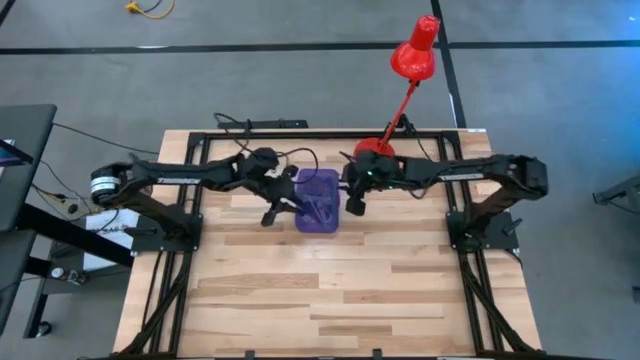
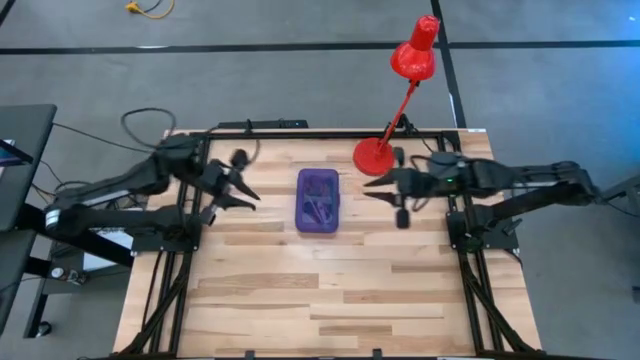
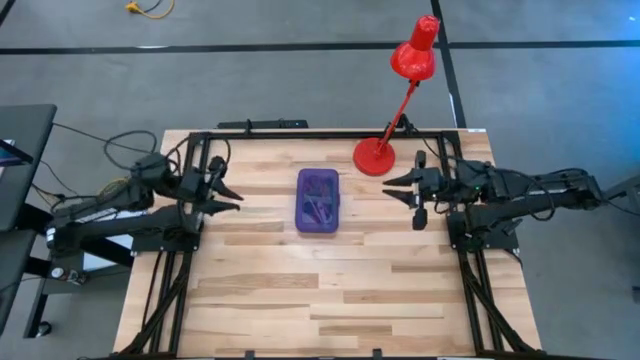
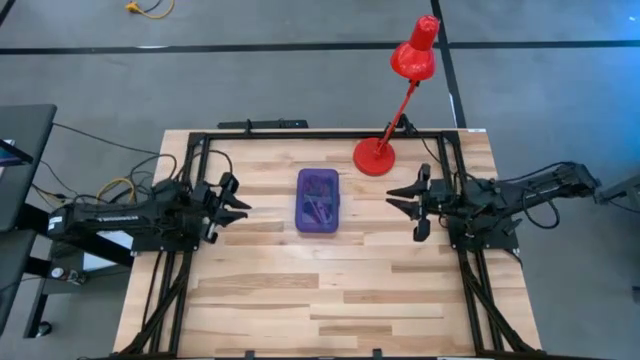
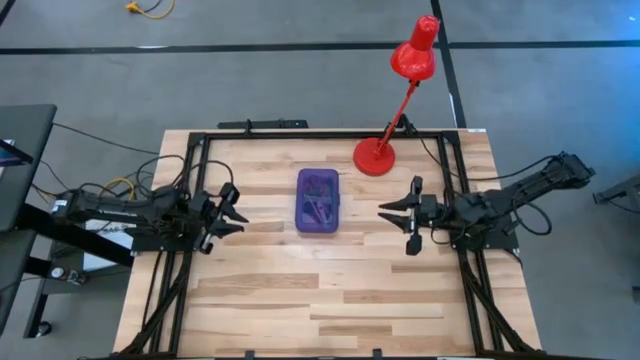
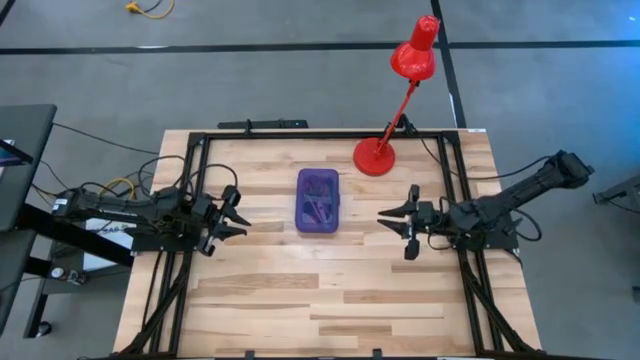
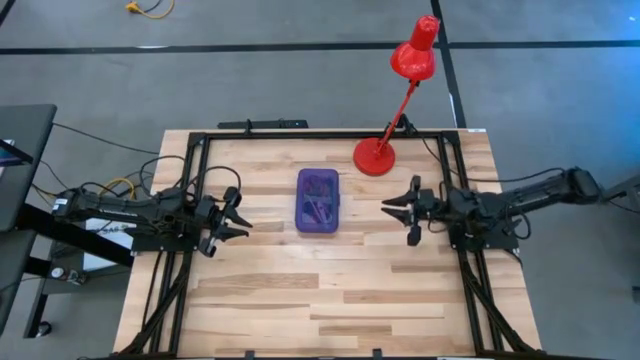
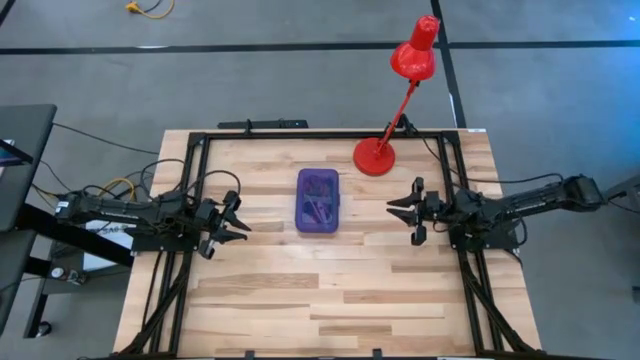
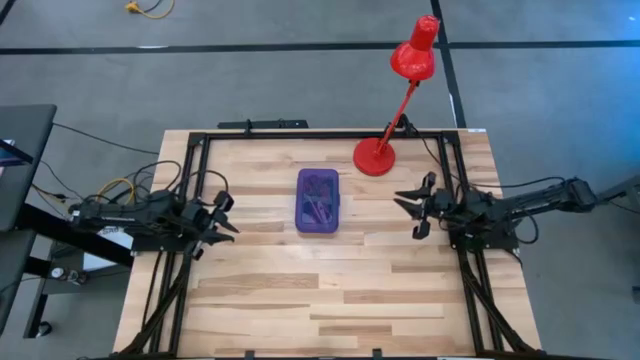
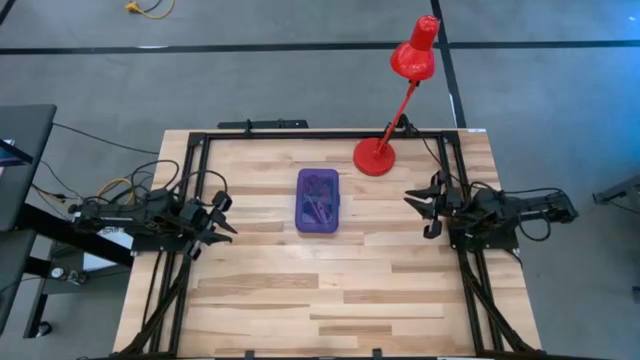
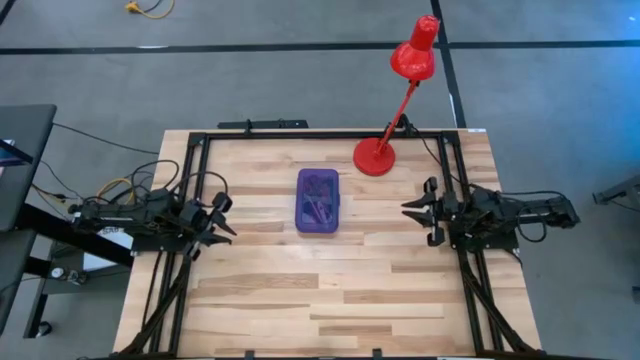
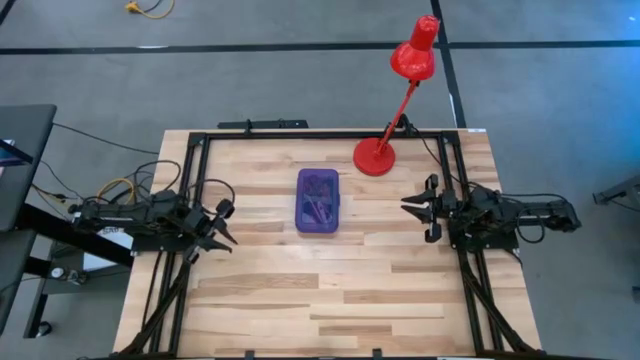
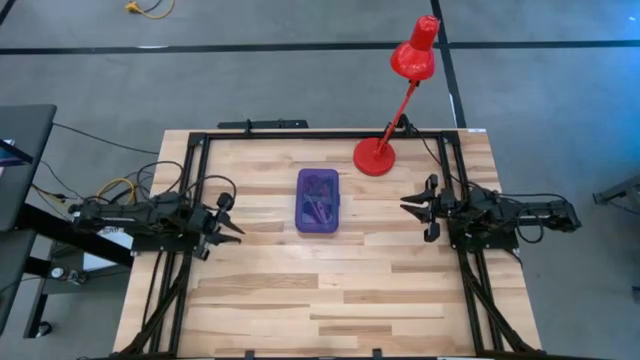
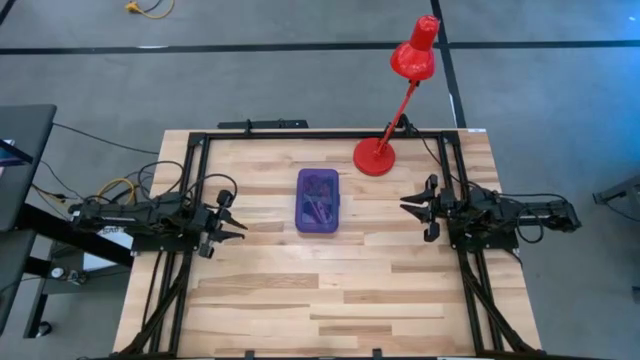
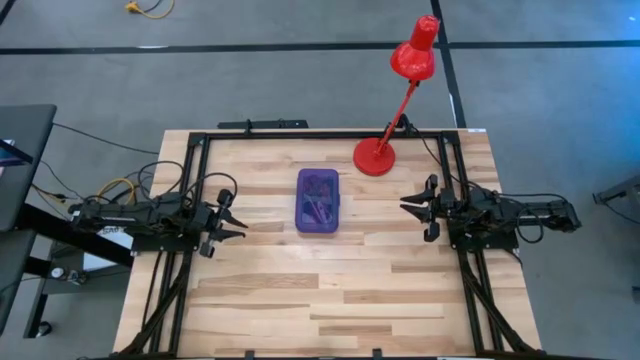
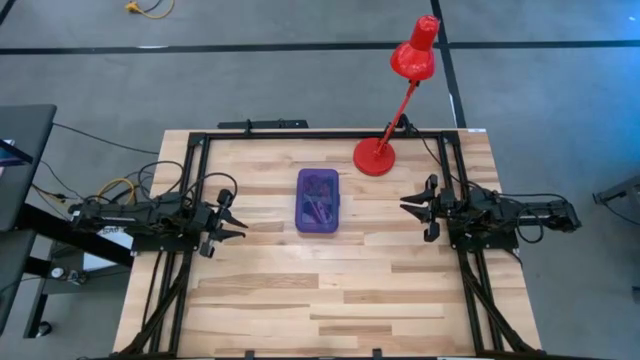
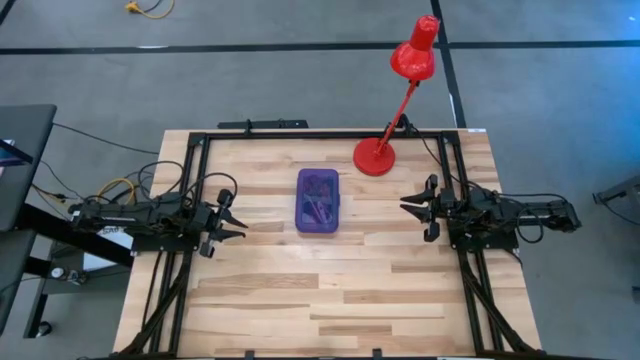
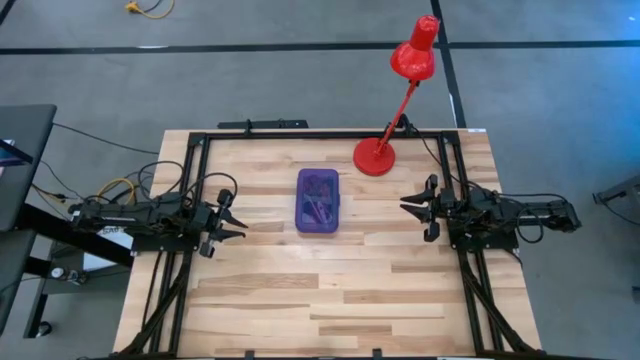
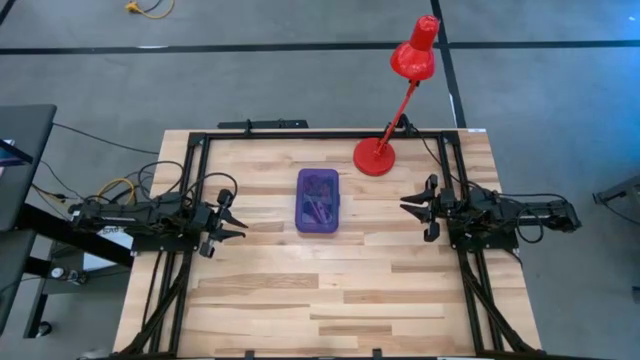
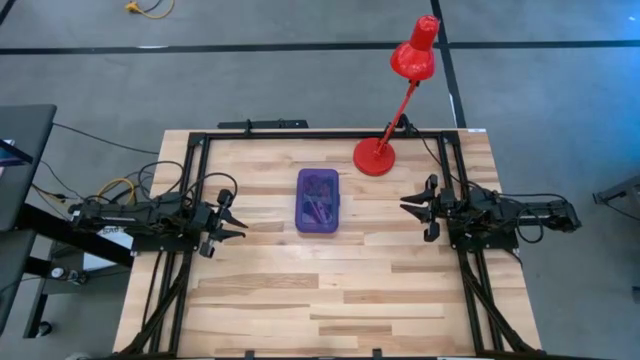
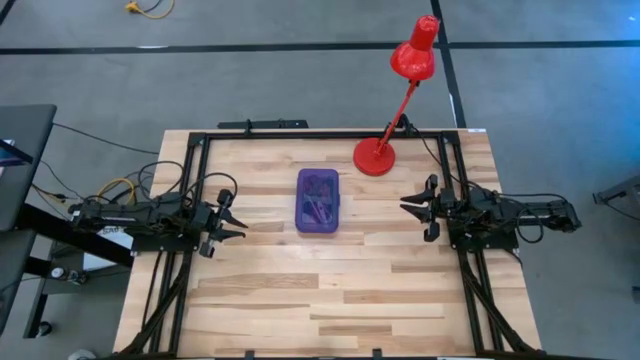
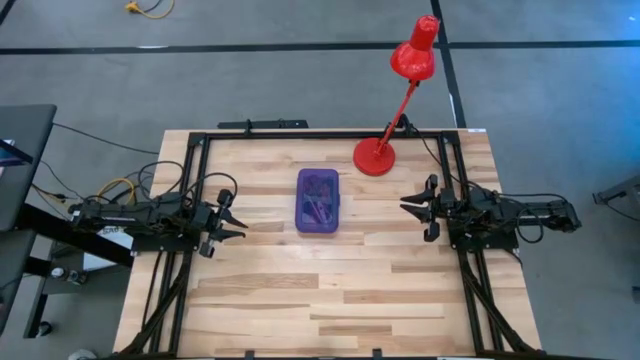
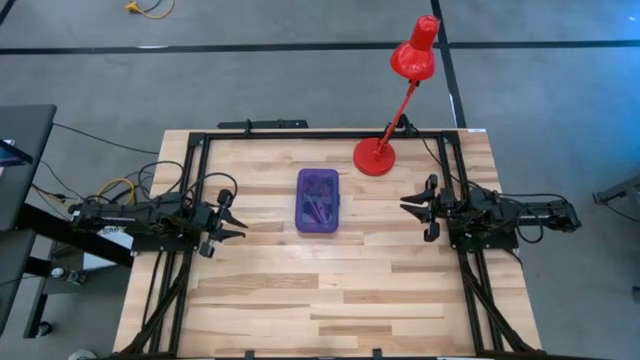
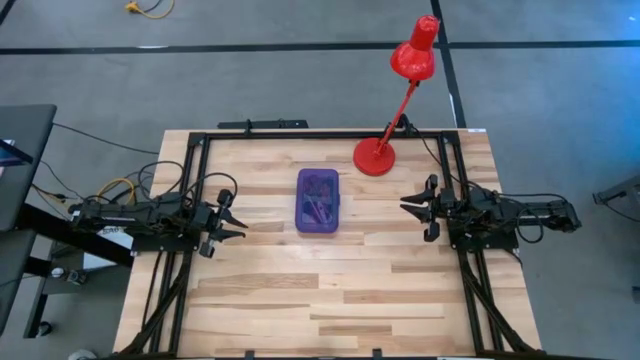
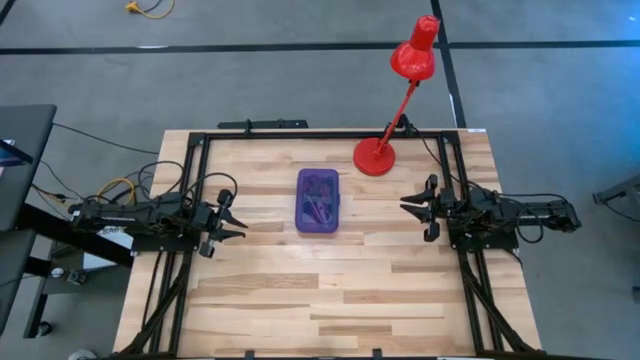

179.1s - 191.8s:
Task: Pick & place school supplies into a supply box
Return to Home Position

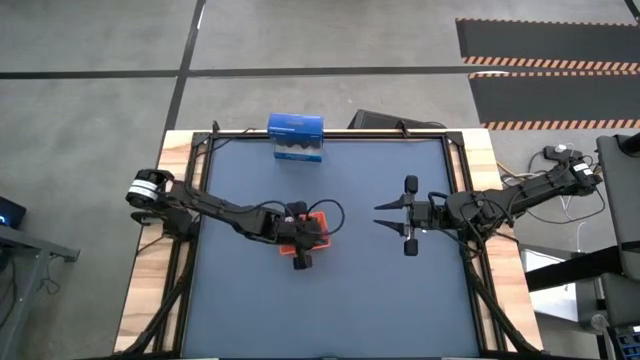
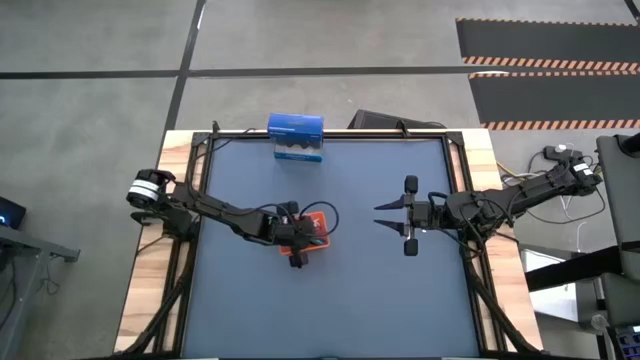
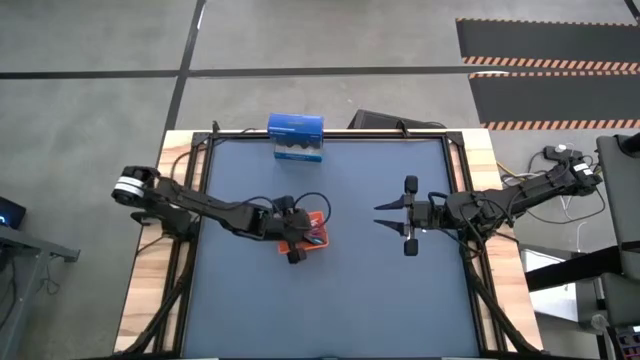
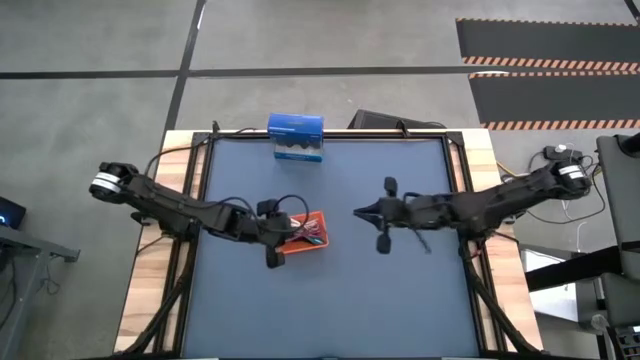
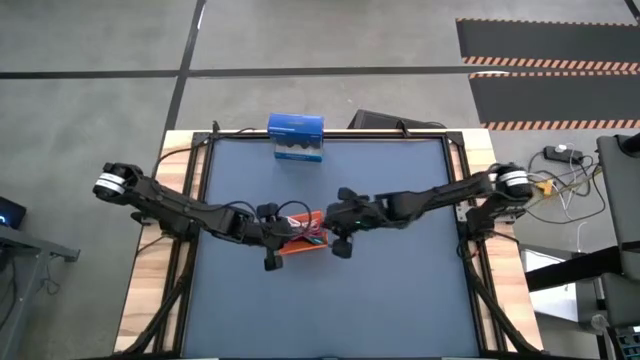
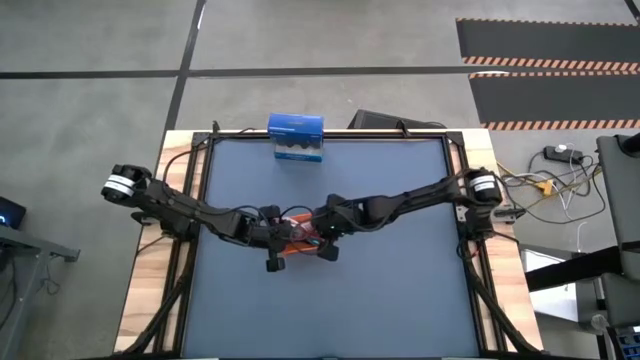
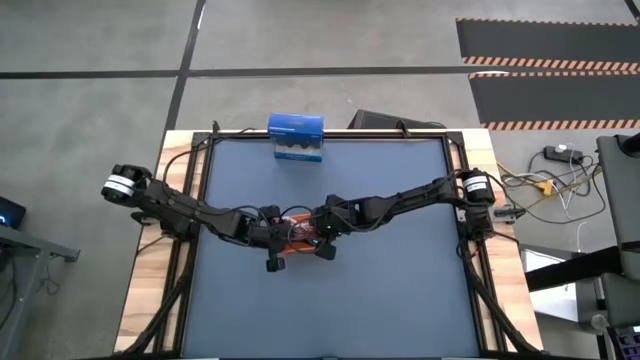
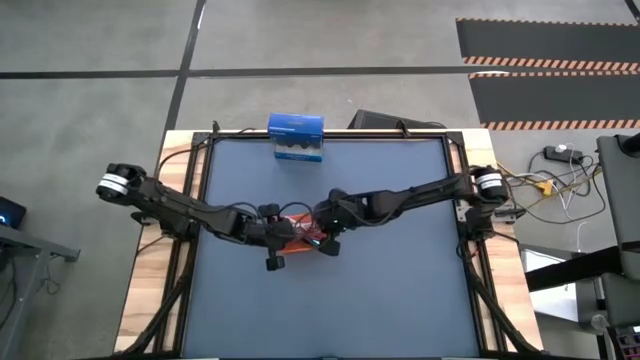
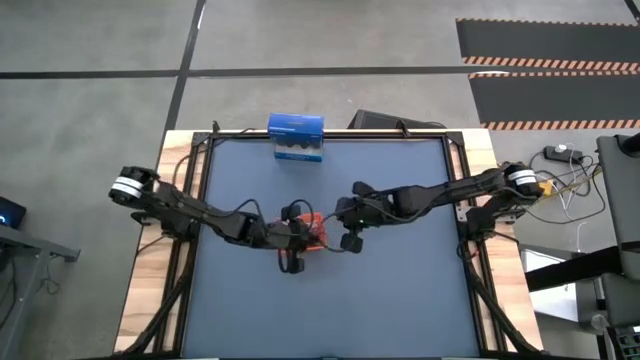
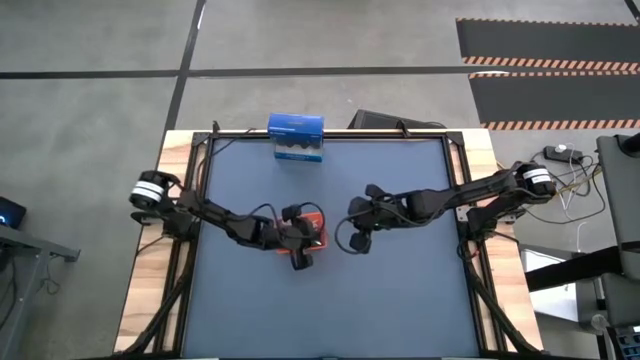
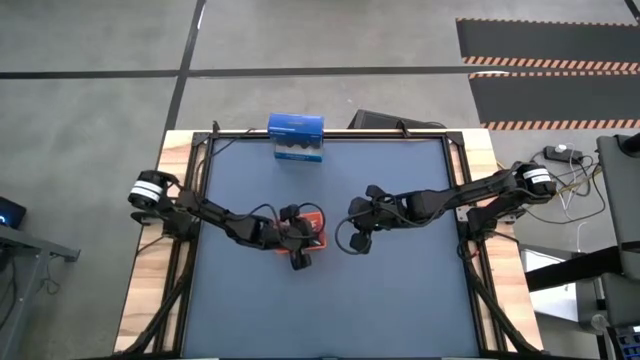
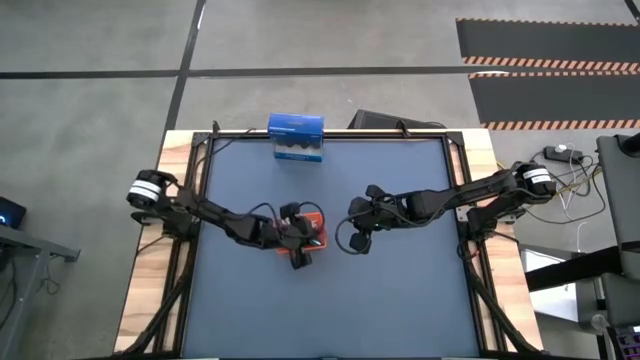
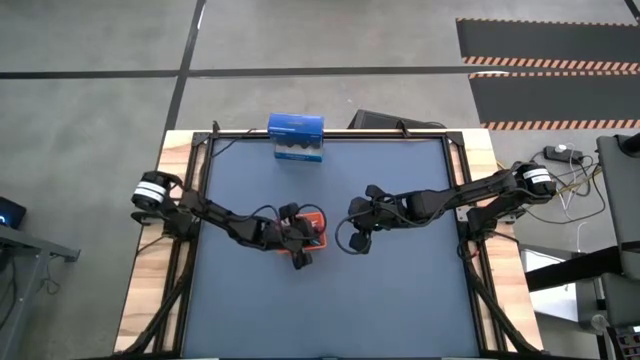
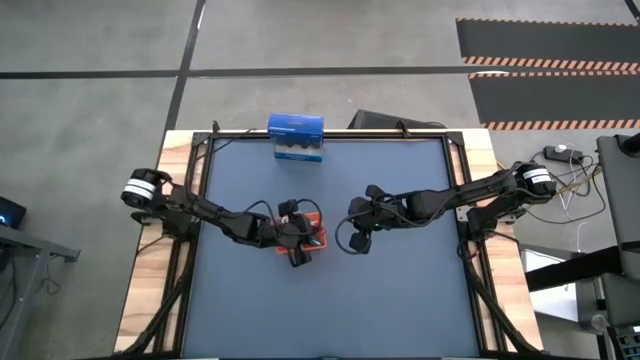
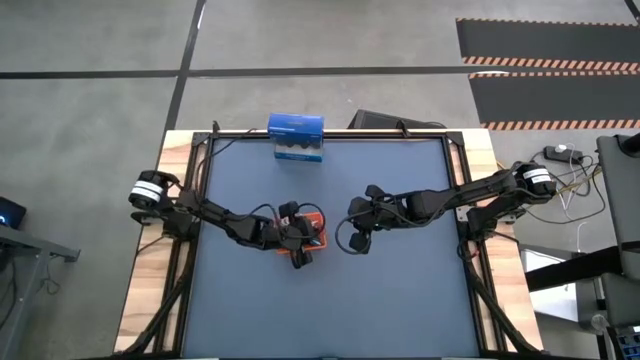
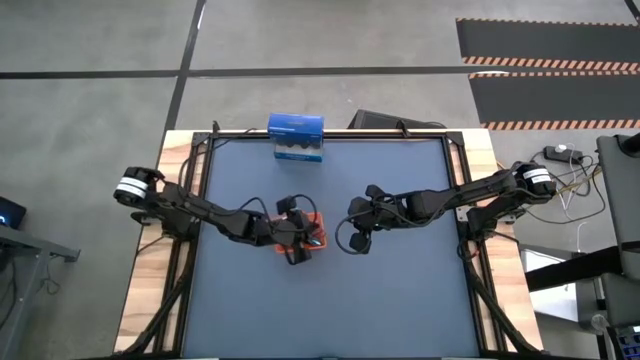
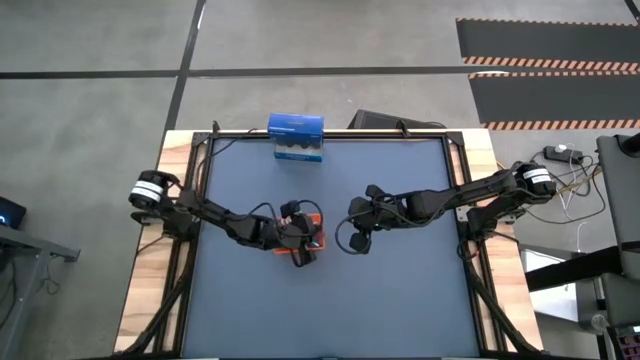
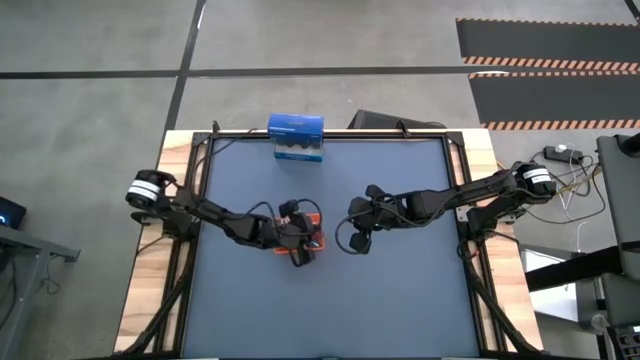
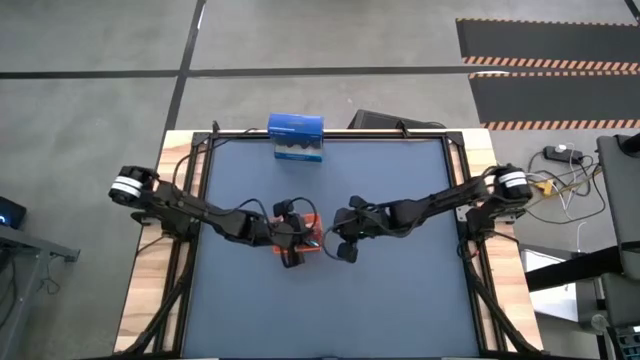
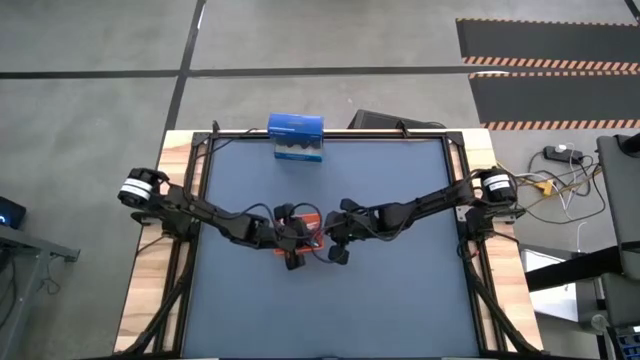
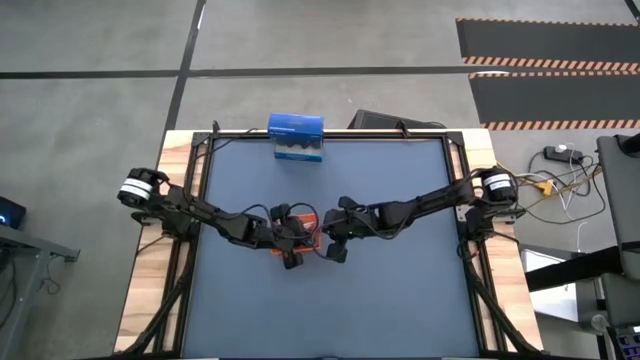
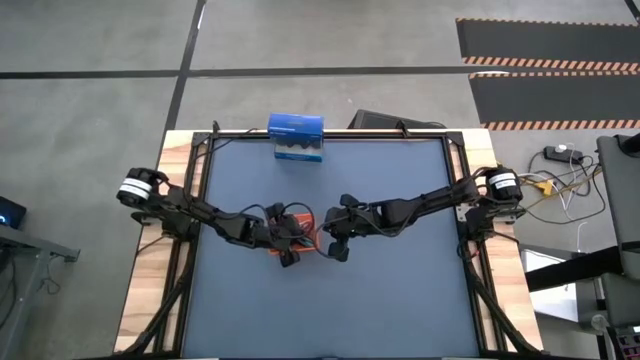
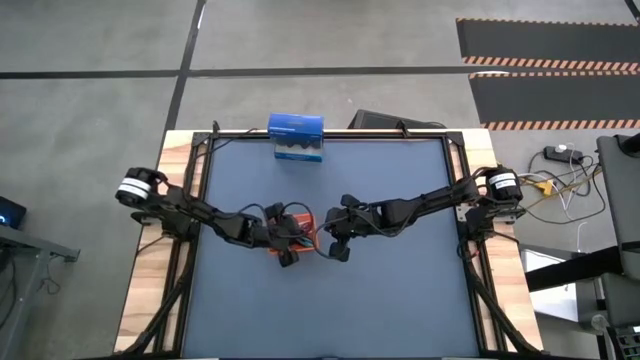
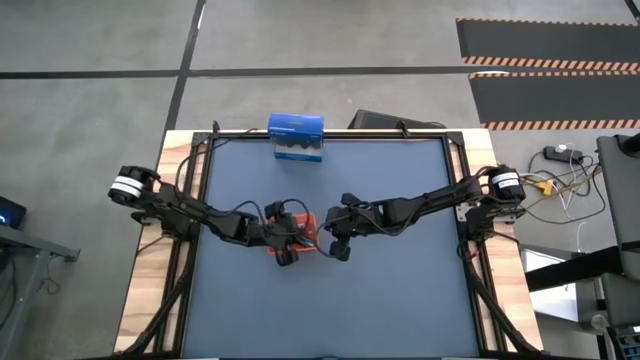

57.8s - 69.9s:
Task: Pick and place USB-C Cables
Put the red charger cable into the orange bin
